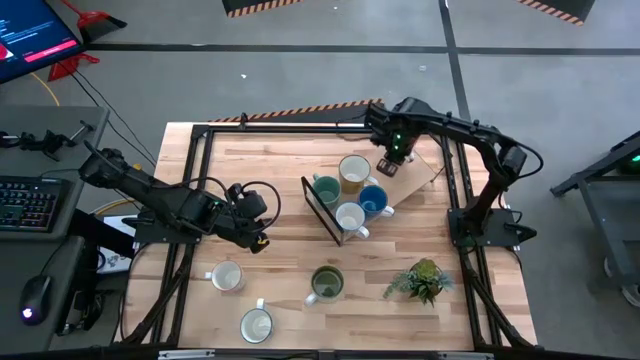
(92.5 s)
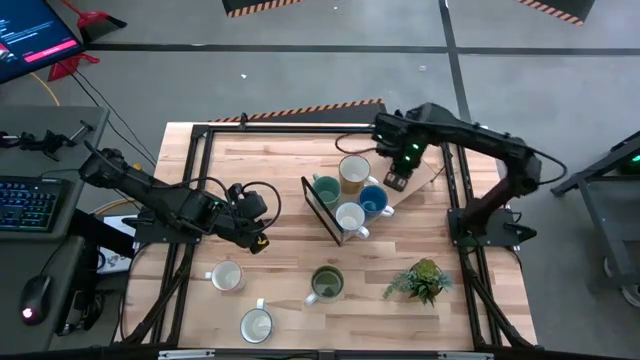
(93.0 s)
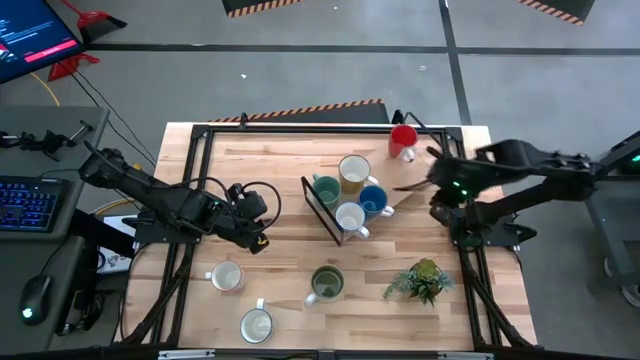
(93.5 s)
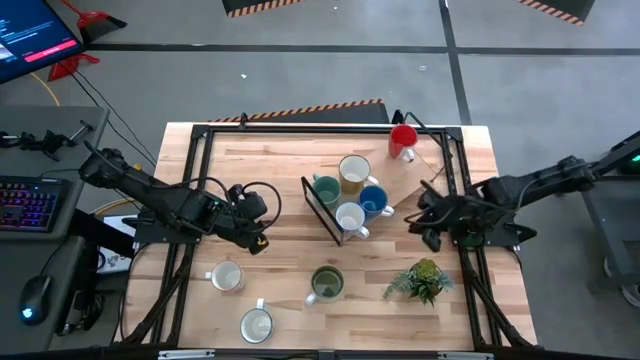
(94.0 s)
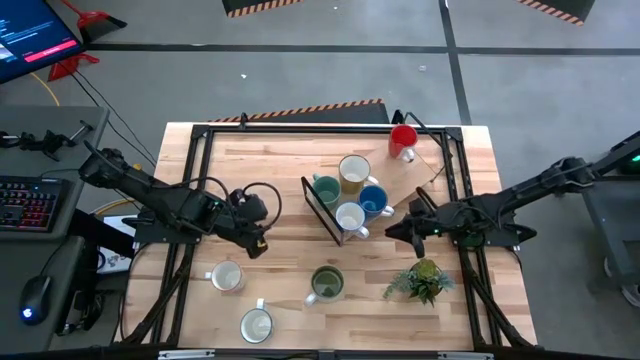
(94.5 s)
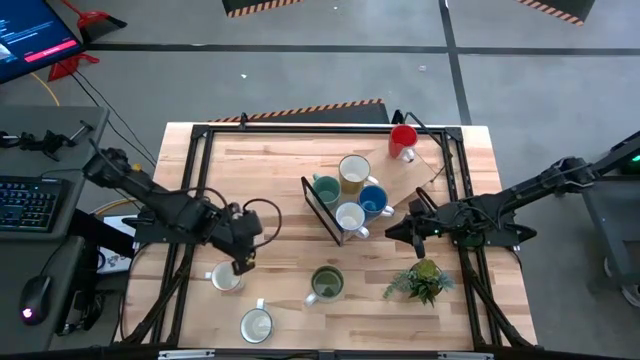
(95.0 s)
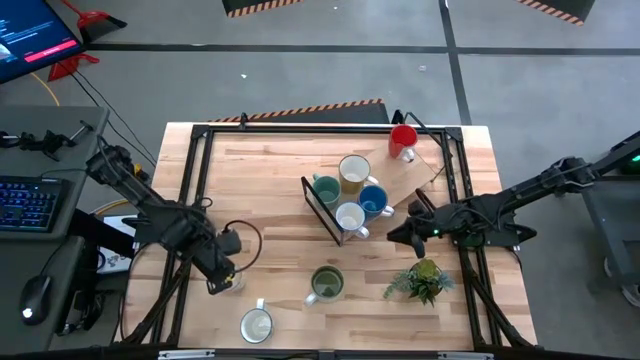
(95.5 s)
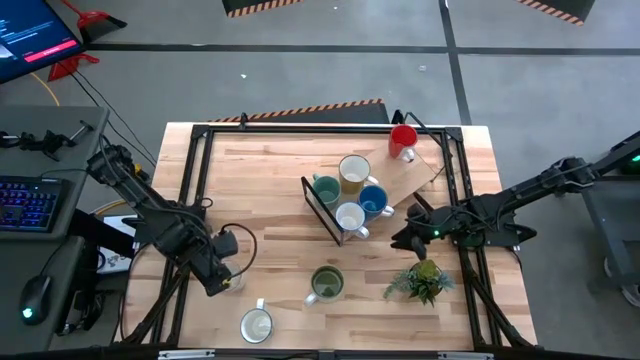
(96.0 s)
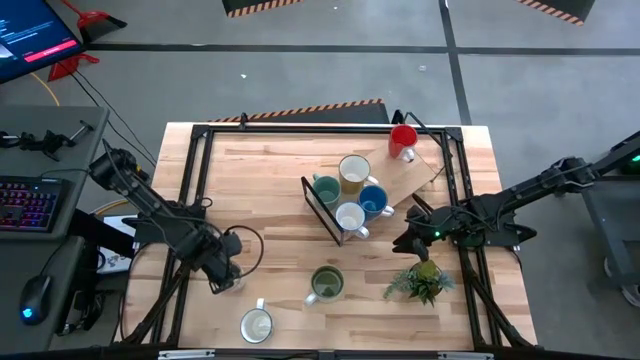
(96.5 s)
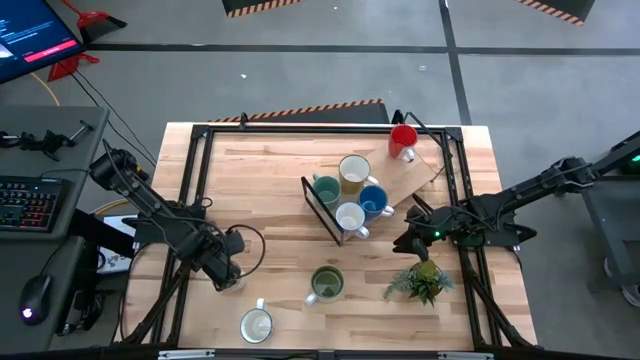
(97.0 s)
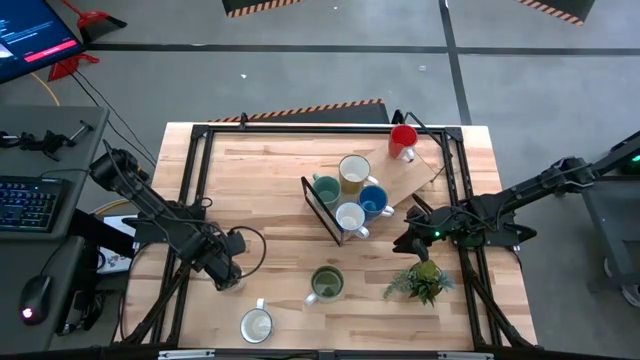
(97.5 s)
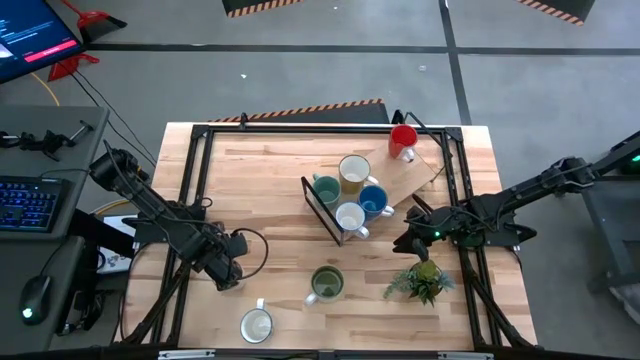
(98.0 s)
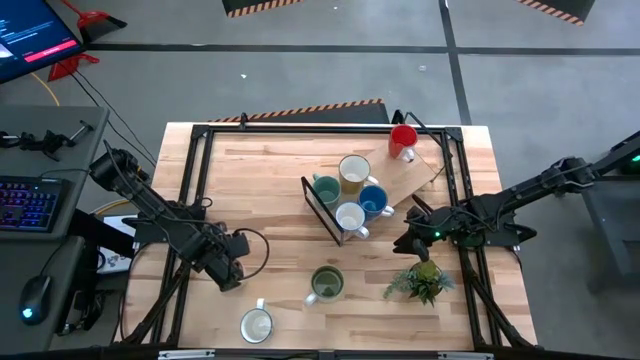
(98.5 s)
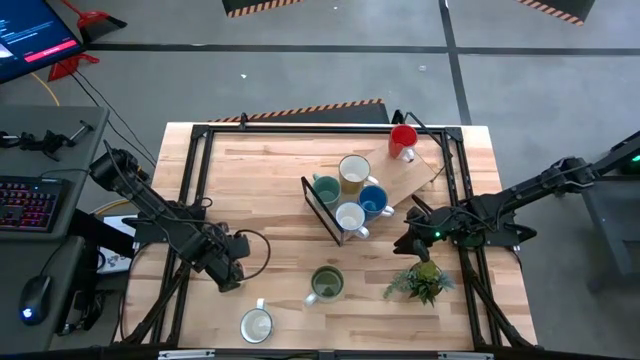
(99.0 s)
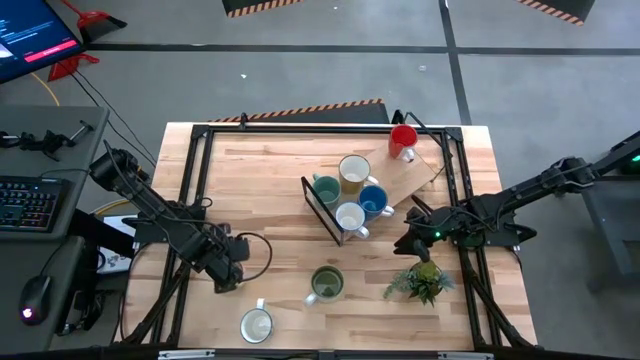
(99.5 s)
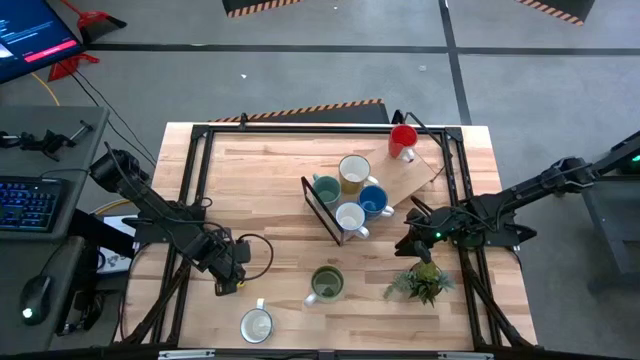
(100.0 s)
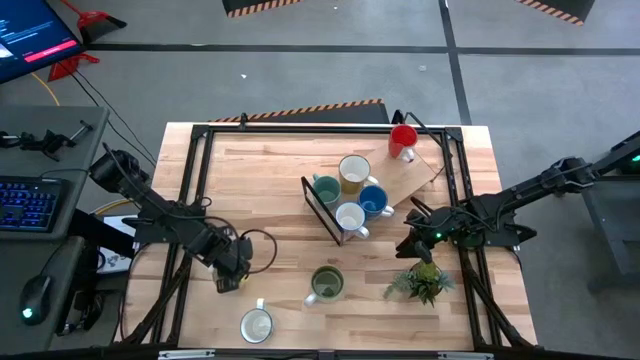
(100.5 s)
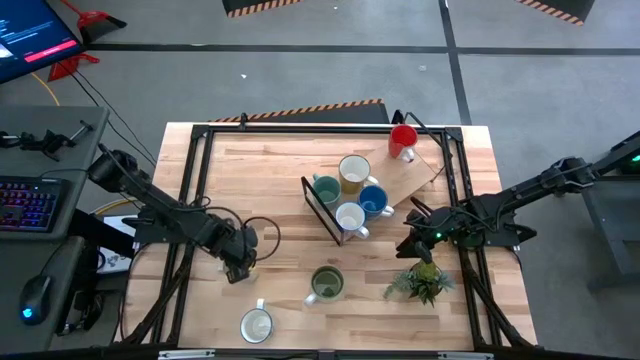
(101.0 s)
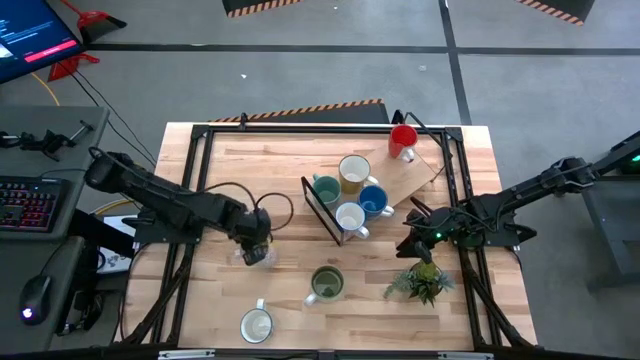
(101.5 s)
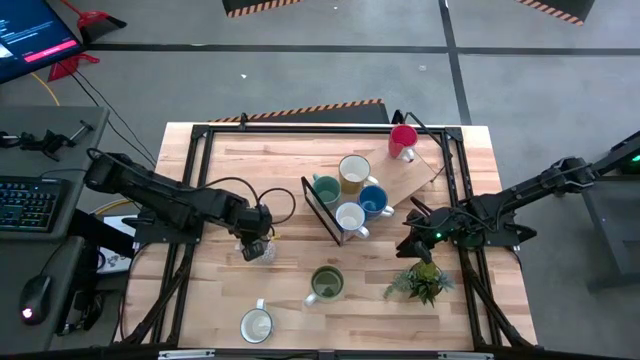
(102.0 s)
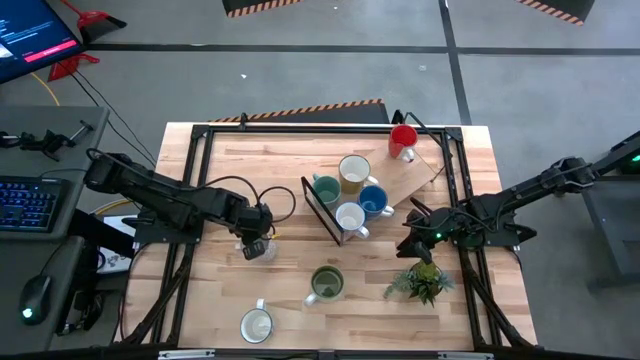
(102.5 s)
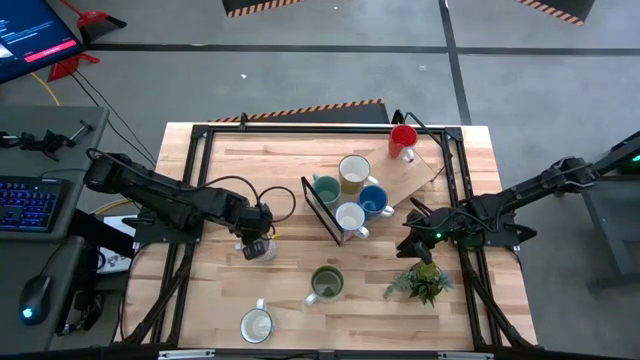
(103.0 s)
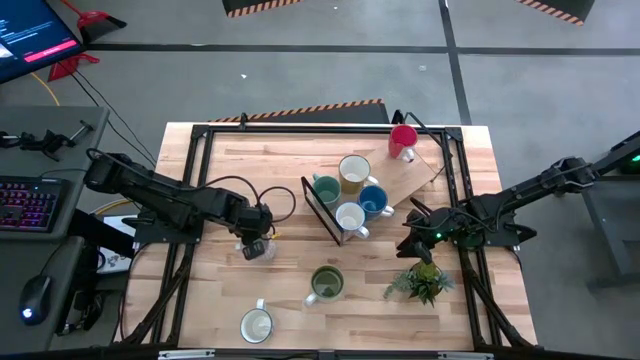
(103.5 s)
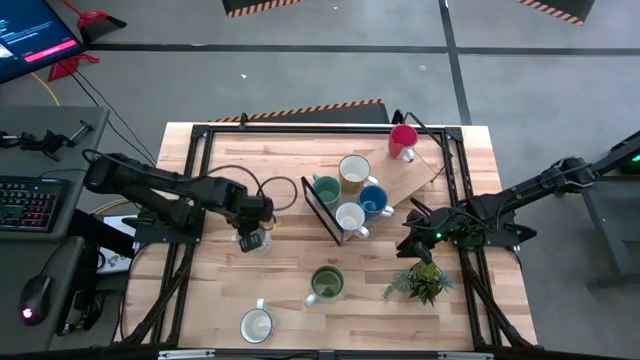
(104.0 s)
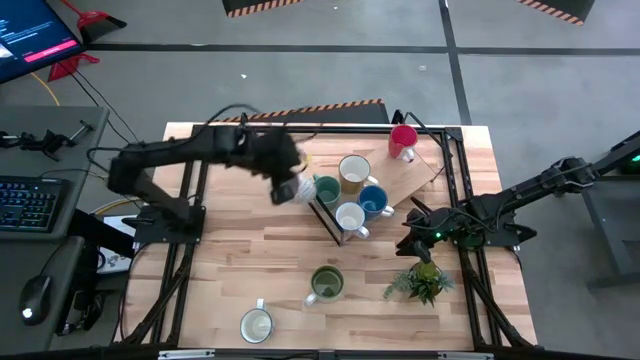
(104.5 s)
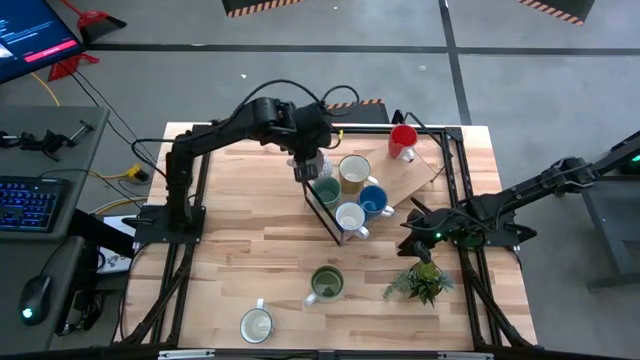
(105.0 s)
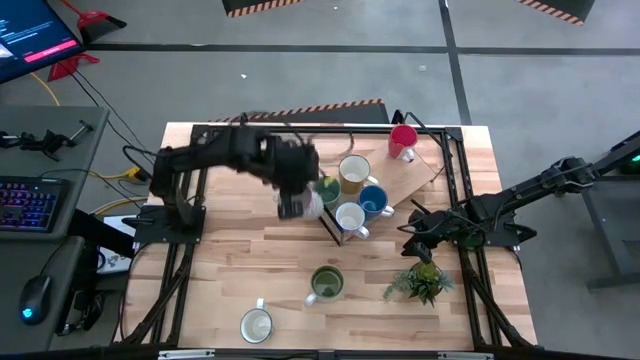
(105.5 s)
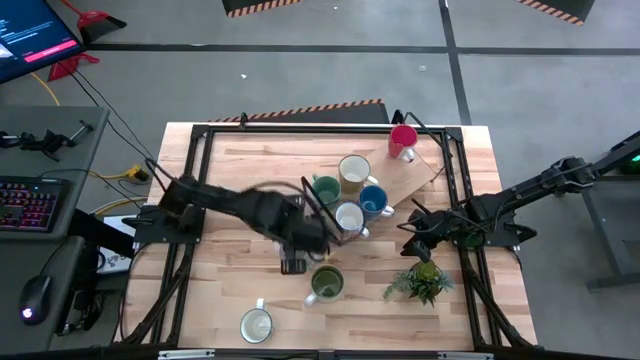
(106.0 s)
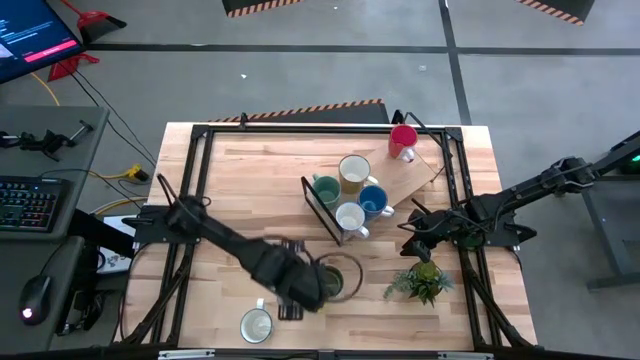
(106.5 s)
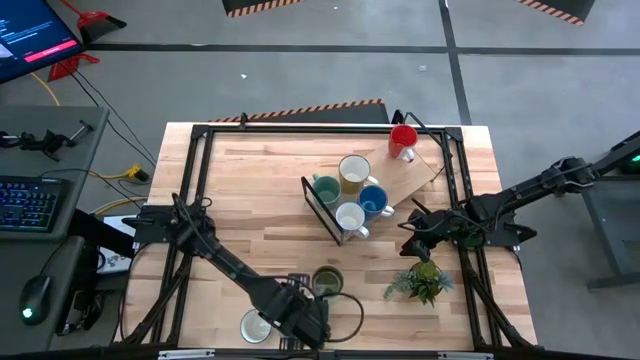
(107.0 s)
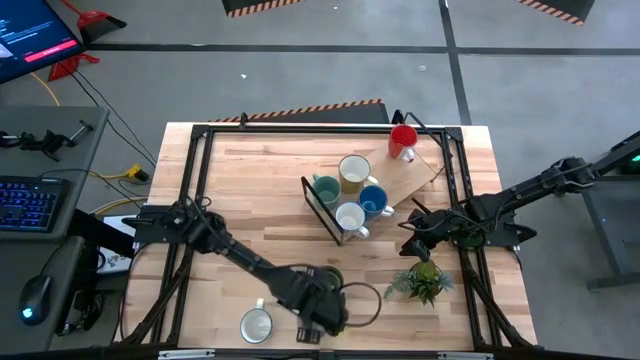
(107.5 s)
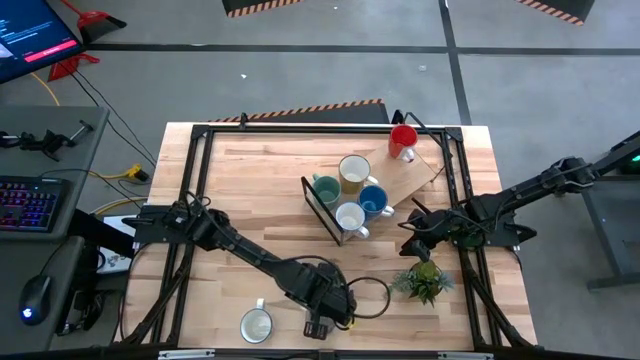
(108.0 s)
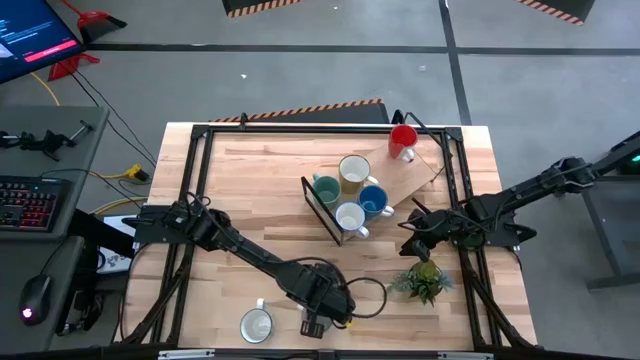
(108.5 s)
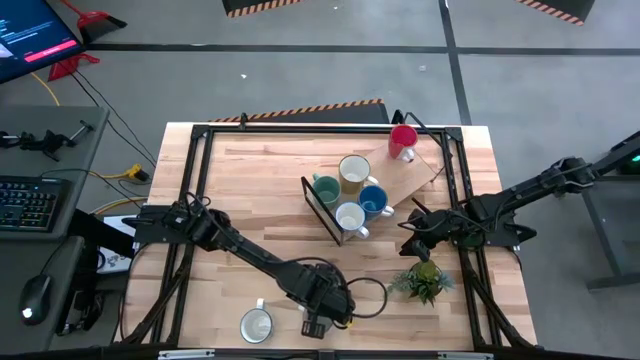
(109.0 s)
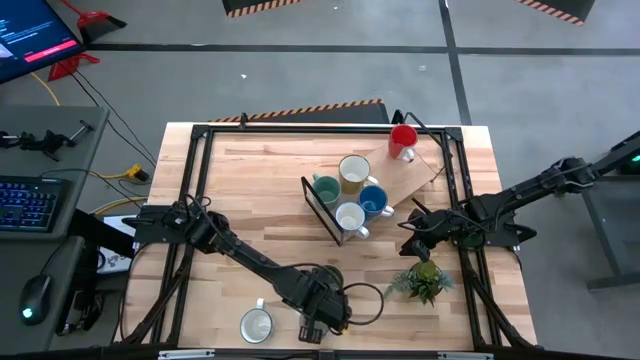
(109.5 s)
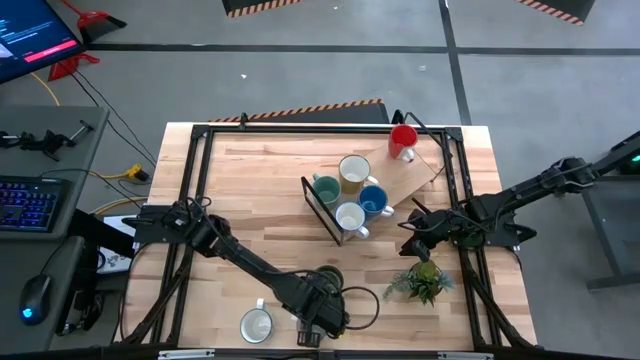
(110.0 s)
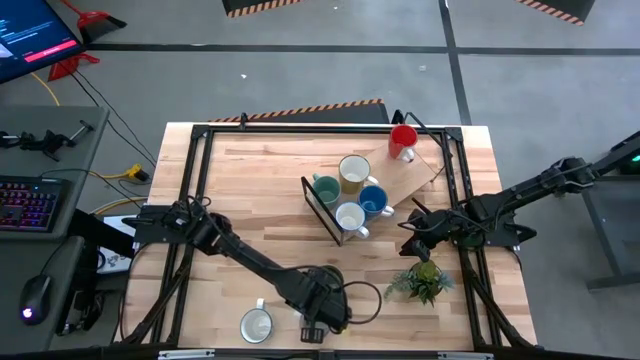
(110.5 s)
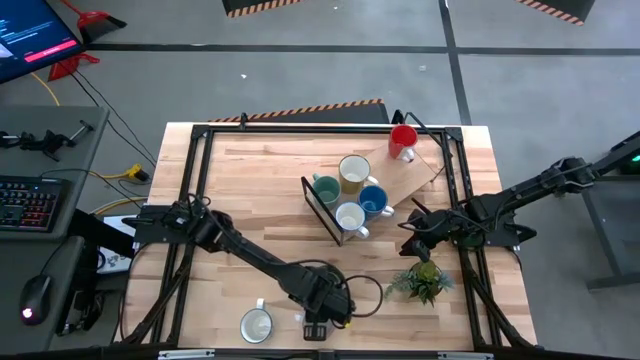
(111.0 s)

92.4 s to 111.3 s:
Task: Place coffee mugs
Move the gray patterned mug to the bottom center of the table

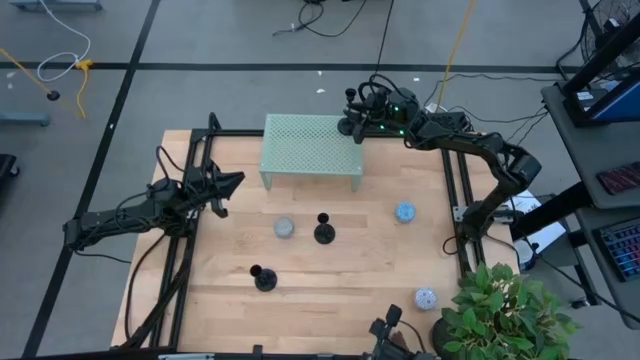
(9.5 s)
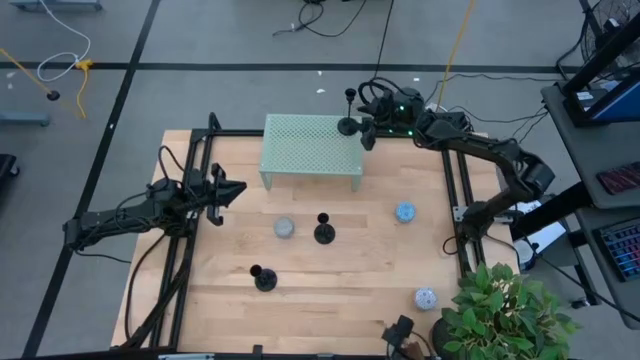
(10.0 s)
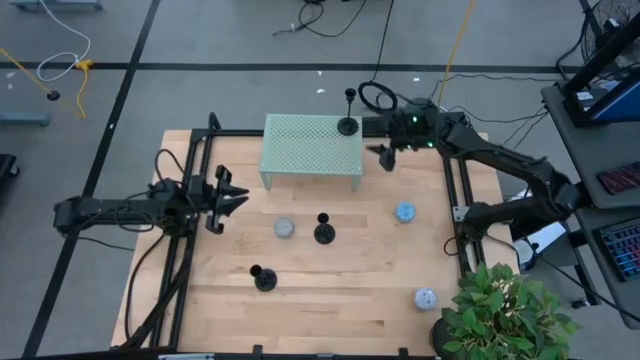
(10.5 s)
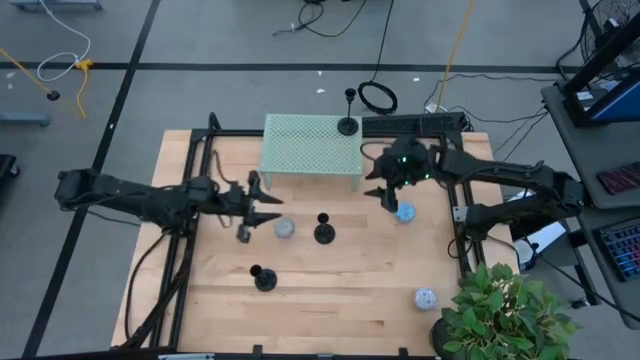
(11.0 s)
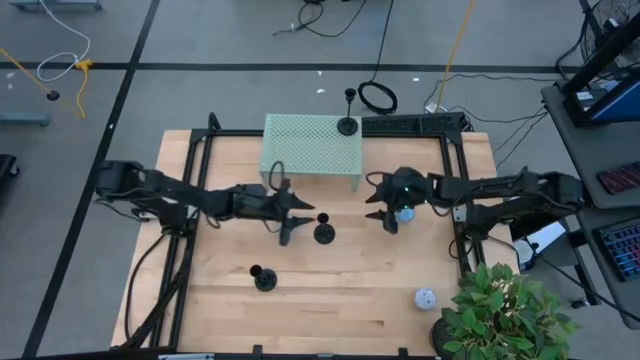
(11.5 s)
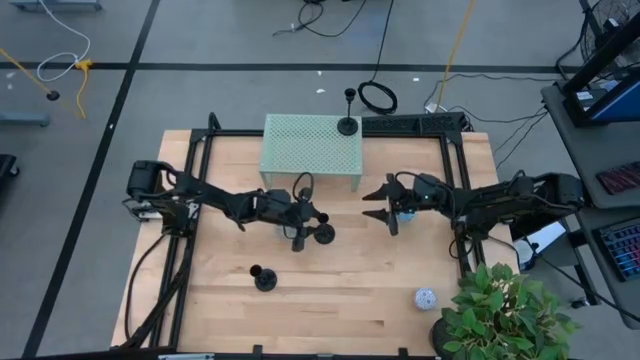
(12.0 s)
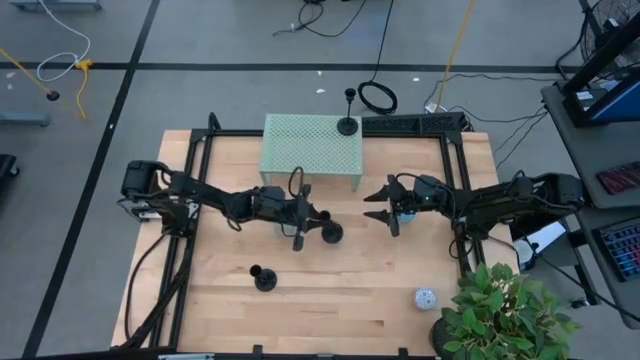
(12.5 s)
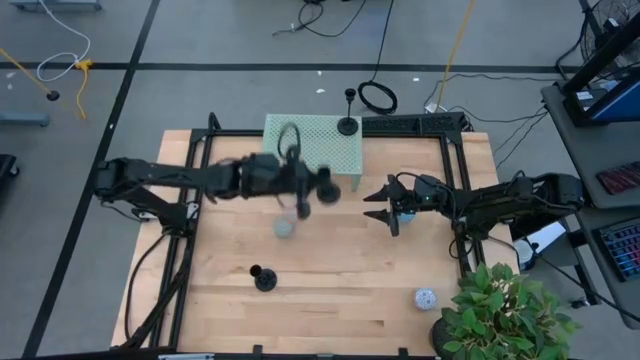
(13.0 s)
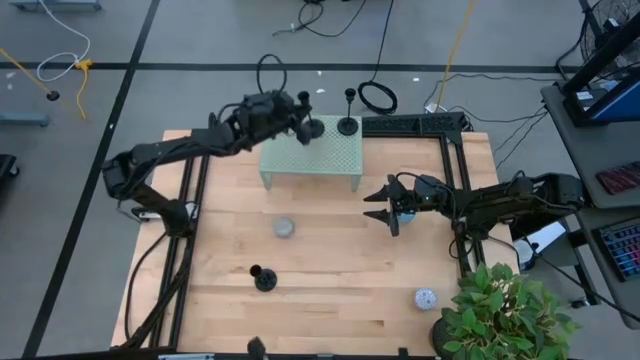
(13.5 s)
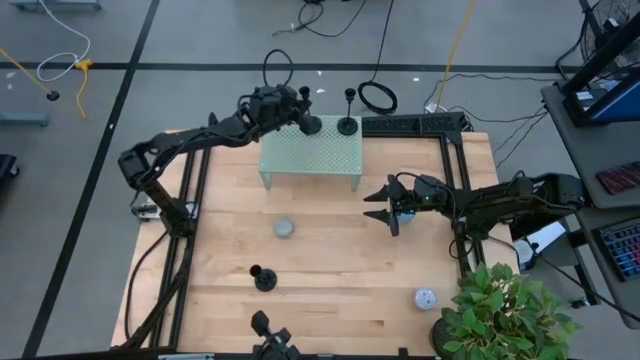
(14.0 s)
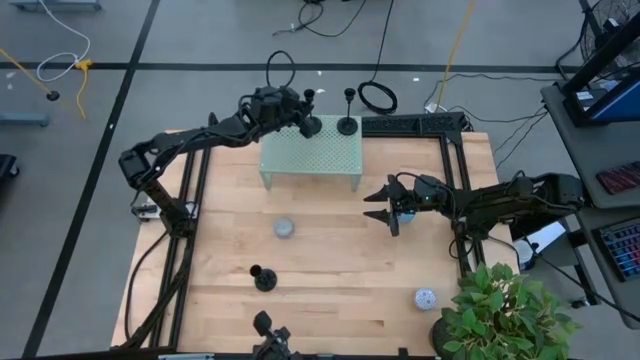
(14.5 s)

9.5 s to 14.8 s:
Task: Pick & Place candle stick holders
Put the top black candle holder on the shelf
